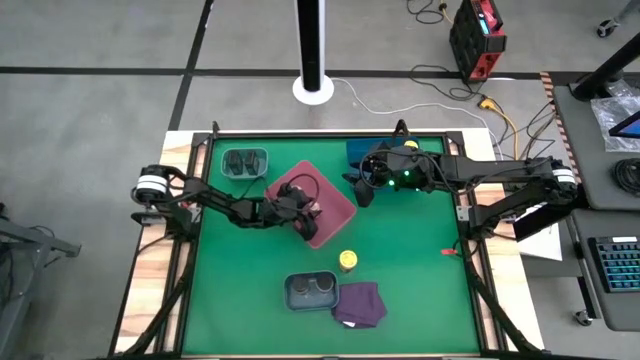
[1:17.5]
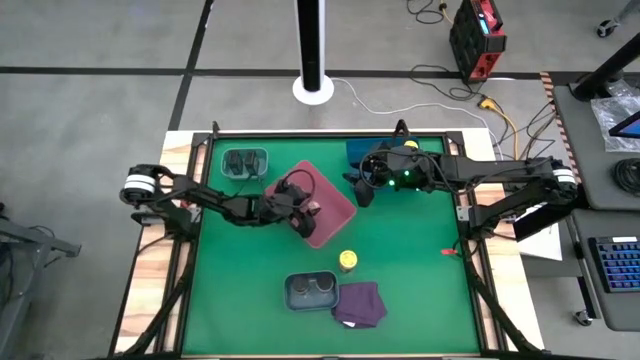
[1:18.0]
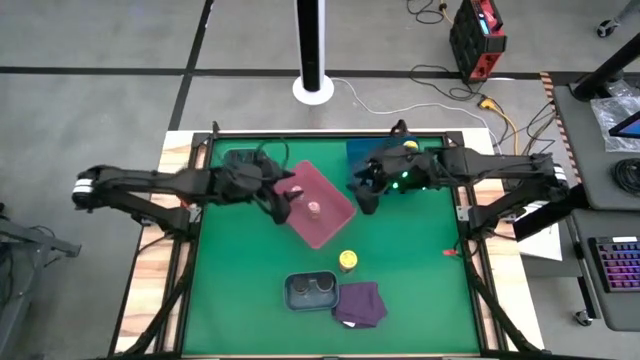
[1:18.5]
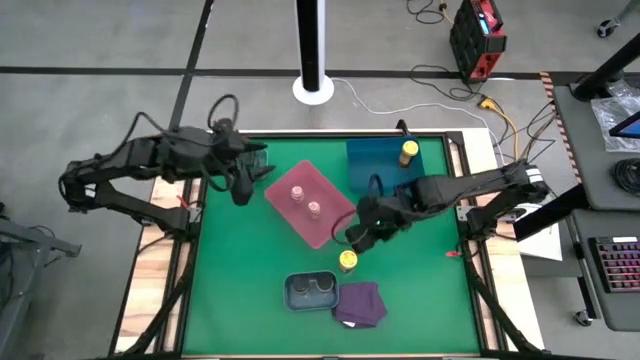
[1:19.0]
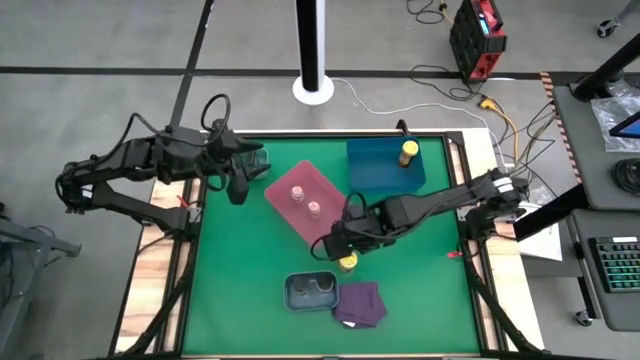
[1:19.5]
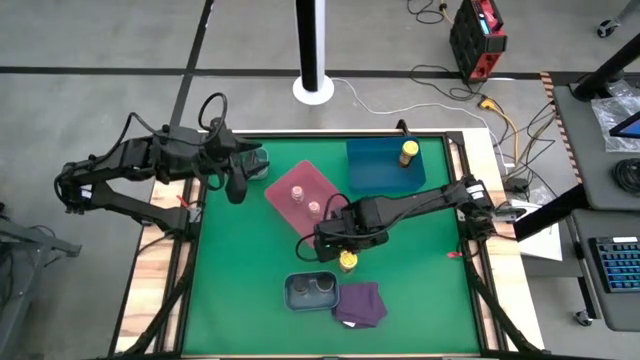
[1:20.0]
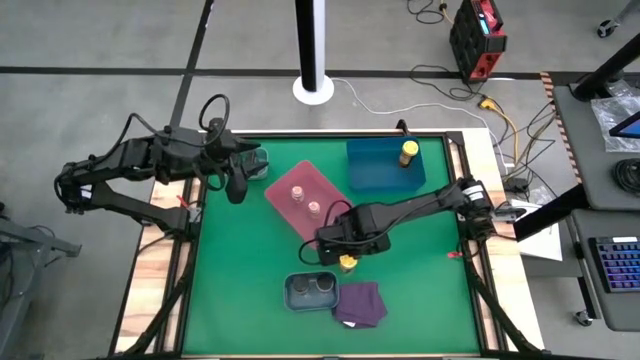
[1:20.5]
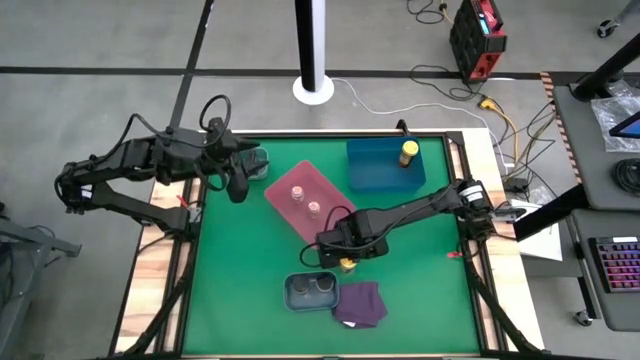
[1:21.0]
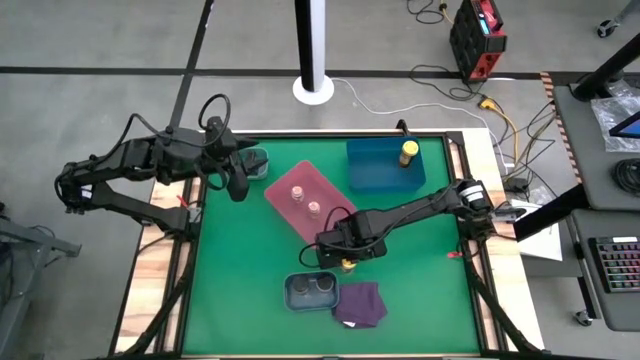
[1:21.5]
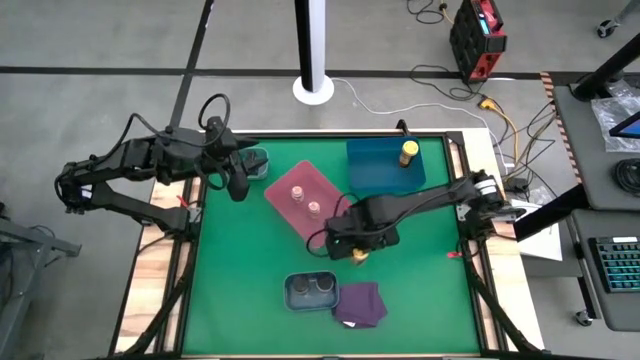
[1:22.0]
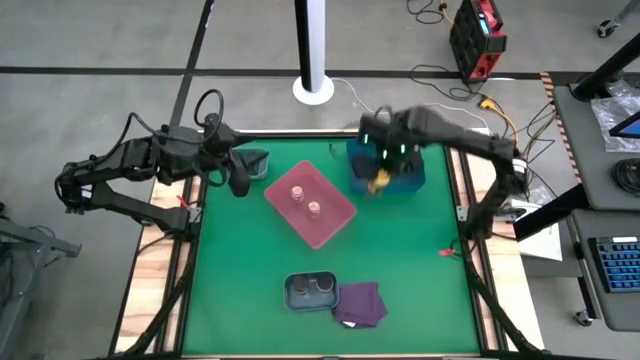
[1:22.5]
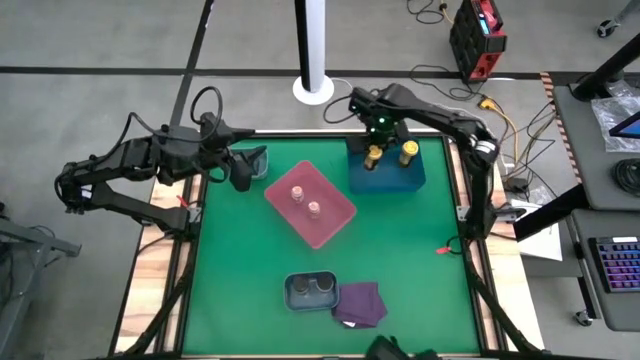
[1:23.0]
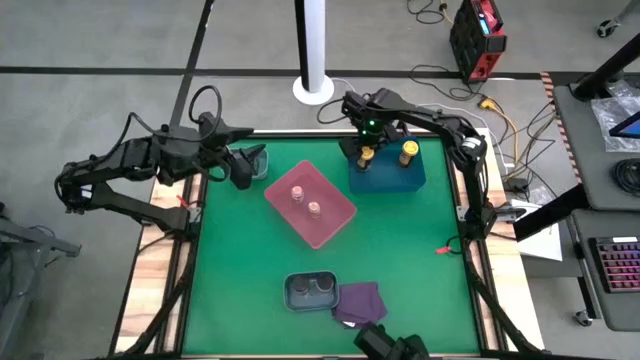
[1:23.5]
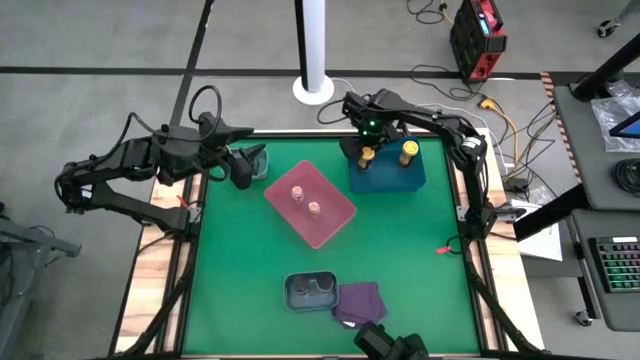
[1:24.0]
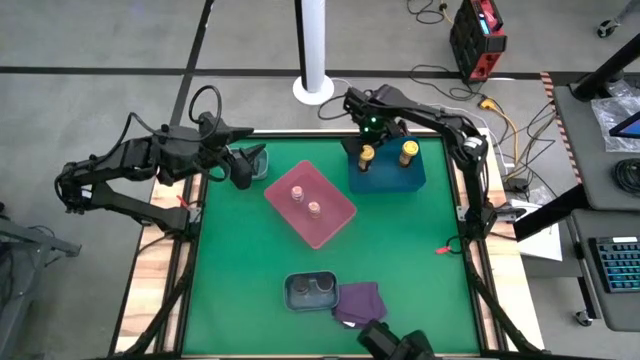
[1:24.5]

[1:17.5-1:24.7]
Task: Sort spices by type
Put the yellow seasoning can into the blue bin

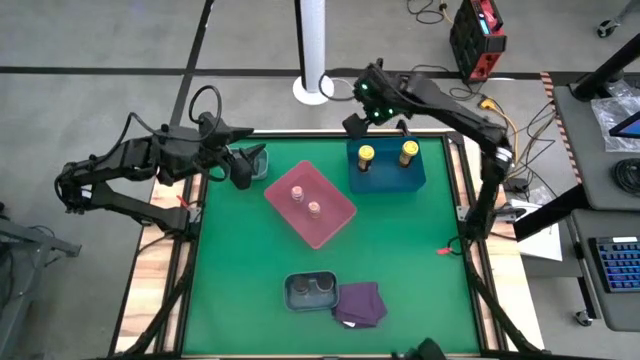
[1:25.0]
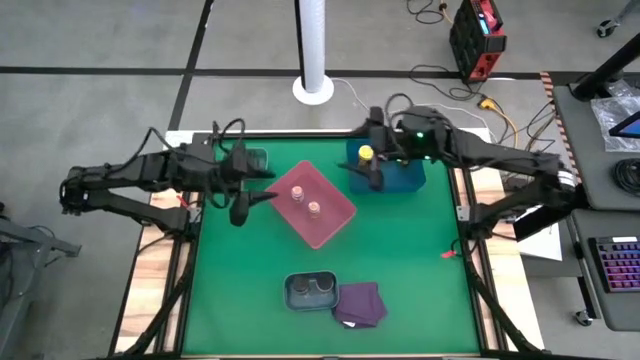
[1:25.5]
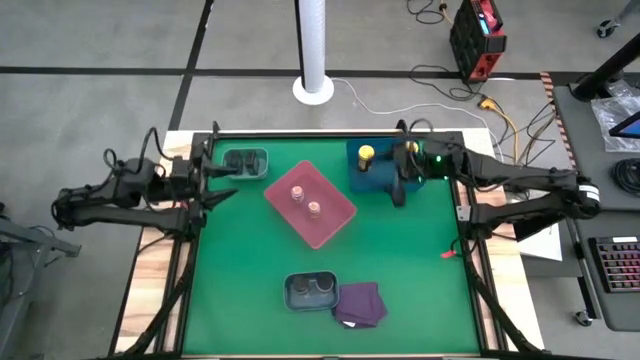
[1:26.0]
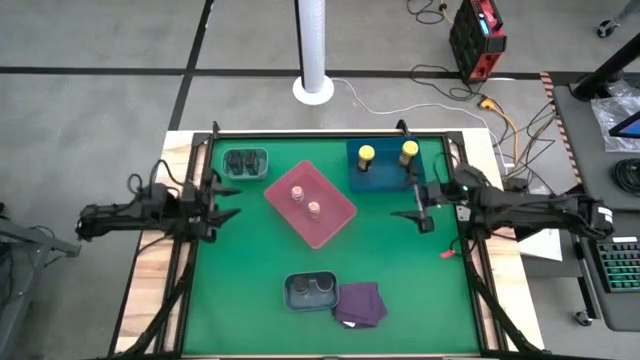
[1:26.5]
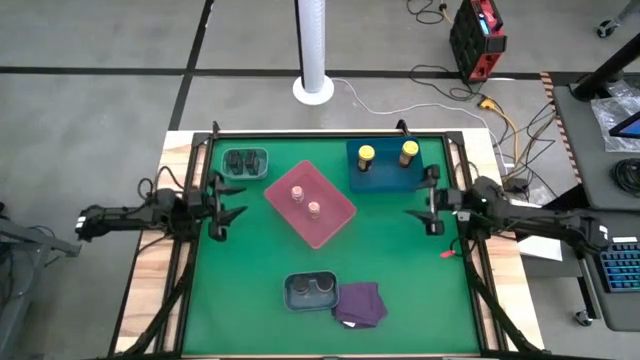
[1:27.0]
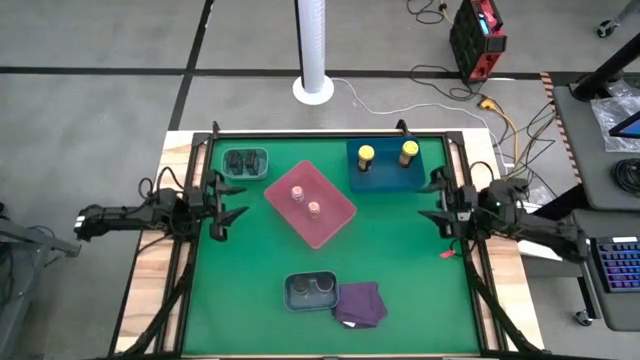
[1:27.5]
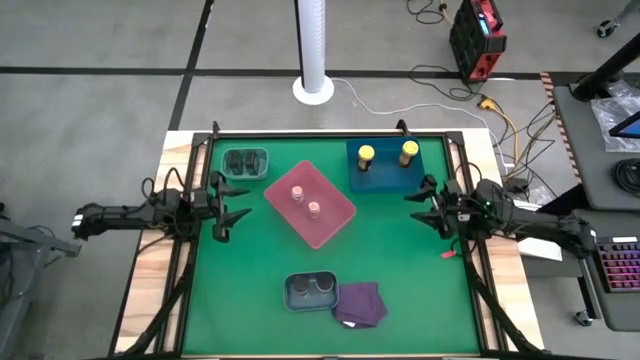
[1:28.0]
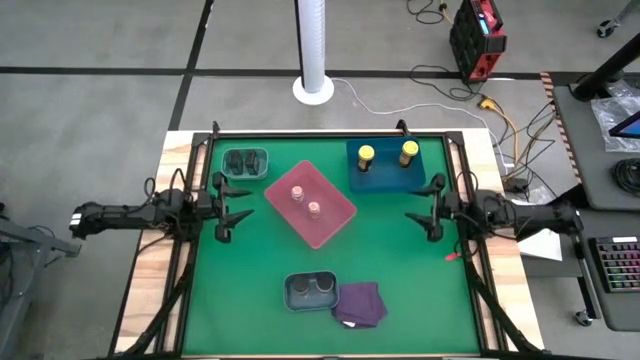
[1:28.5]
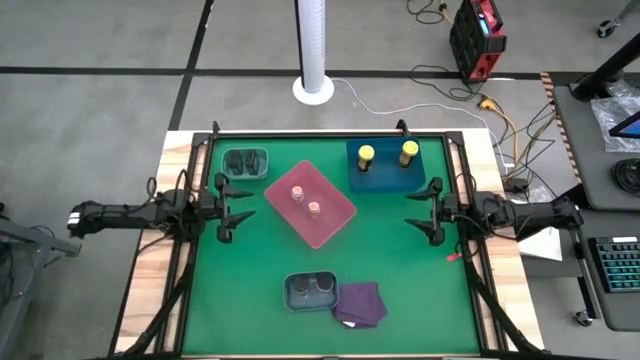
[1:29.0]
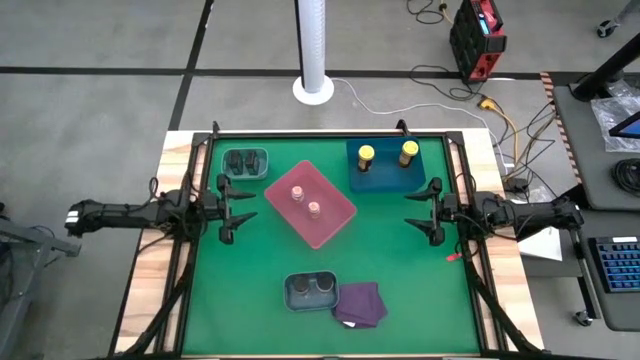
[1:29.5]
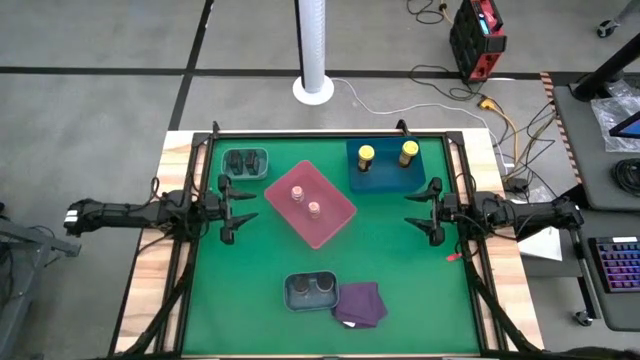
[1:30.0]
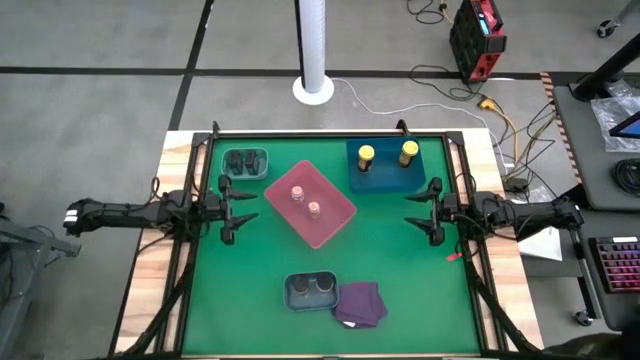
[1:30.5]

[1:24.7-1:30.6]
Return to Home Position

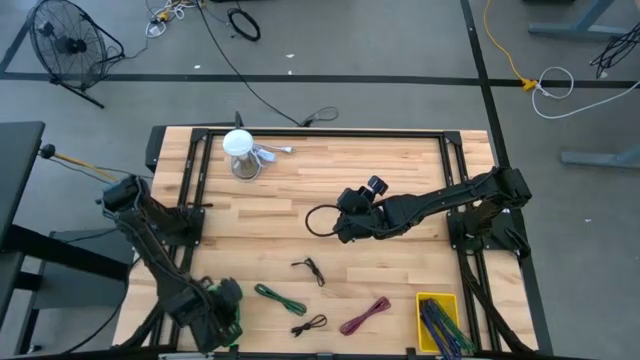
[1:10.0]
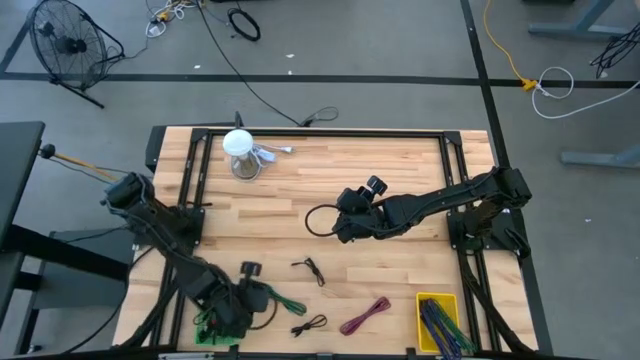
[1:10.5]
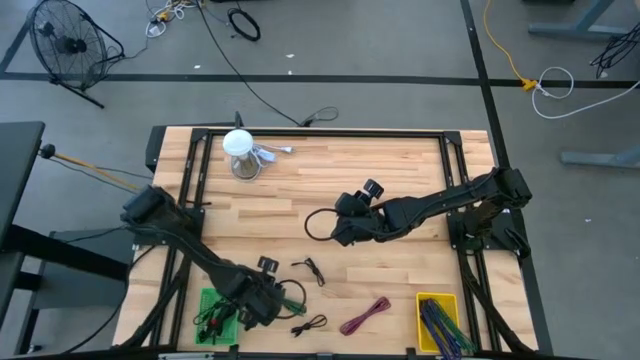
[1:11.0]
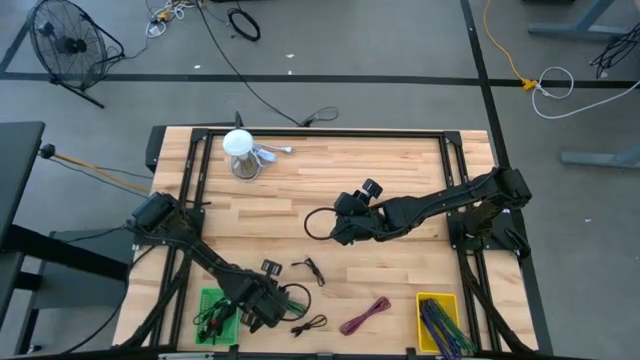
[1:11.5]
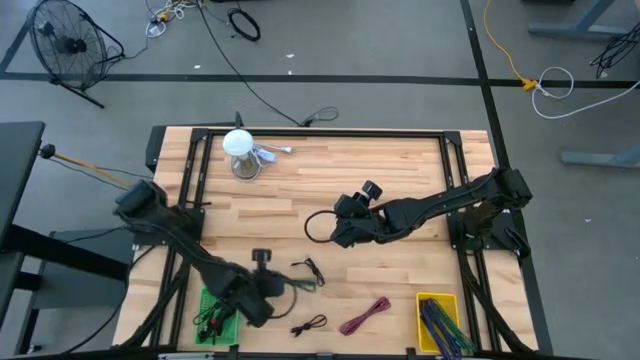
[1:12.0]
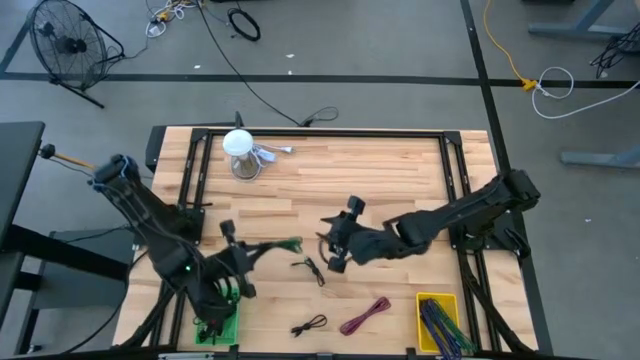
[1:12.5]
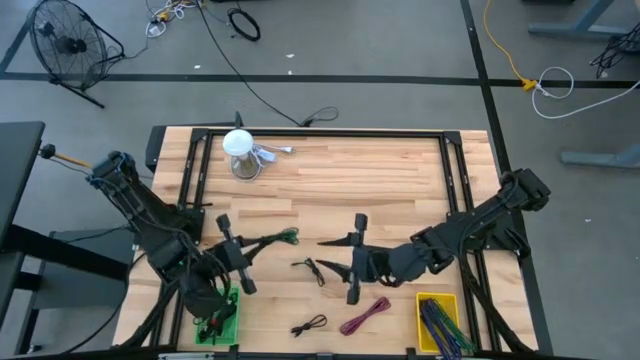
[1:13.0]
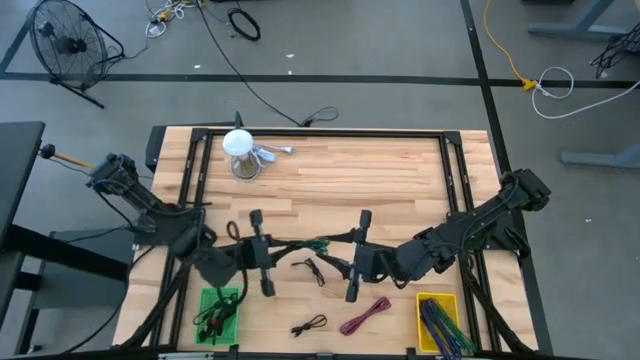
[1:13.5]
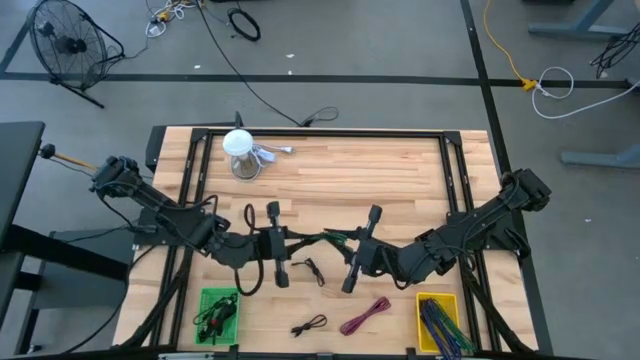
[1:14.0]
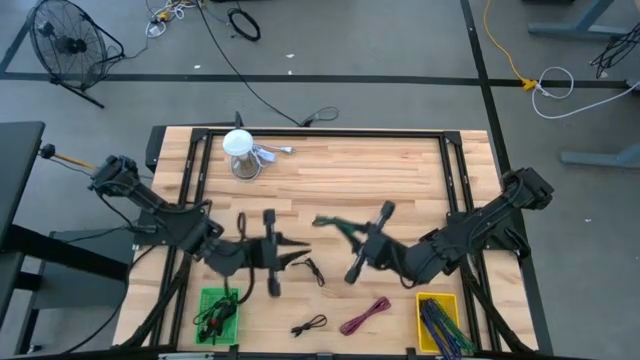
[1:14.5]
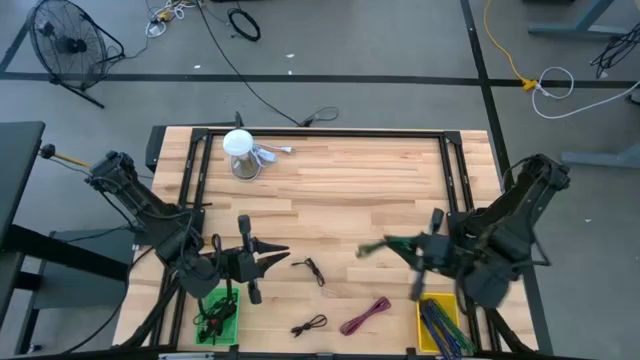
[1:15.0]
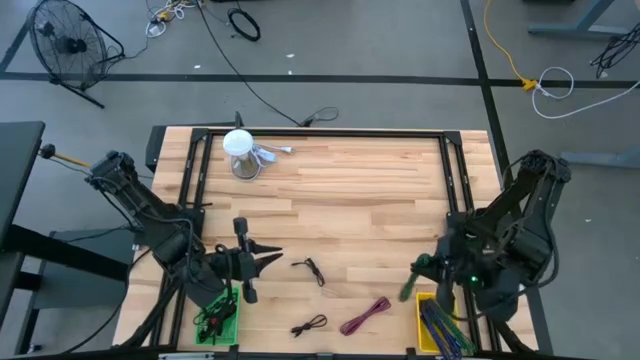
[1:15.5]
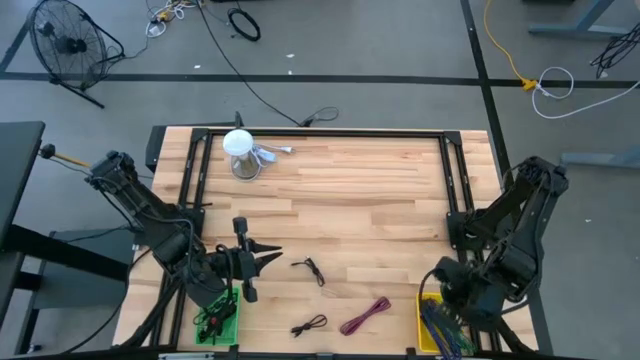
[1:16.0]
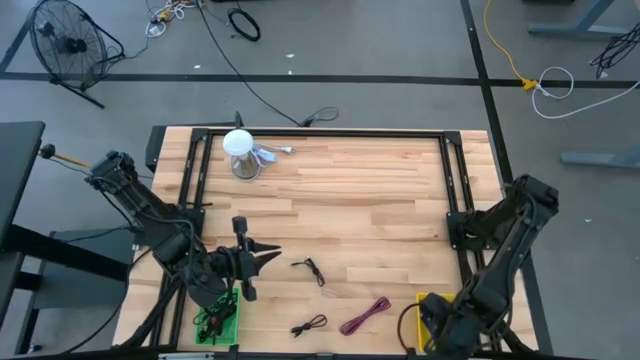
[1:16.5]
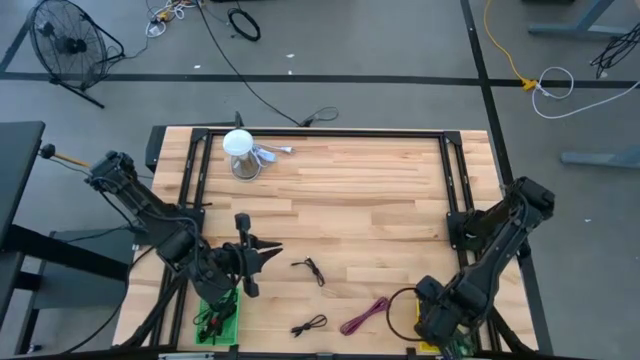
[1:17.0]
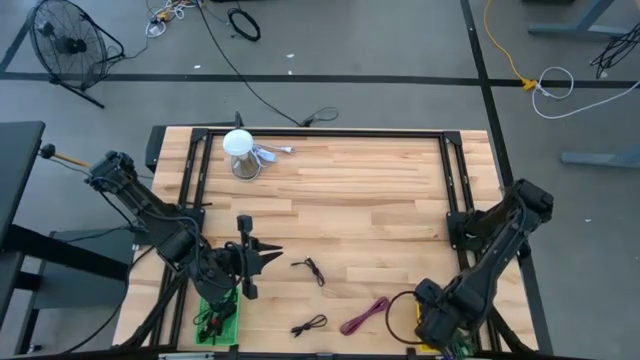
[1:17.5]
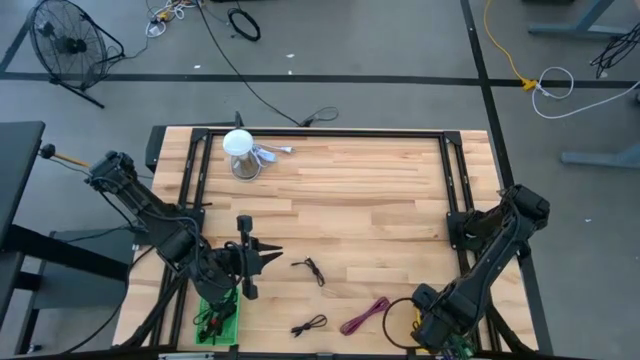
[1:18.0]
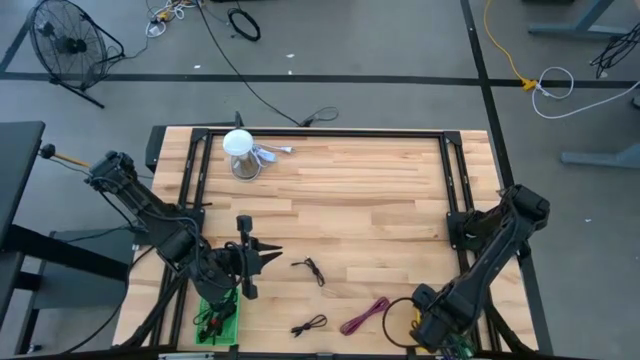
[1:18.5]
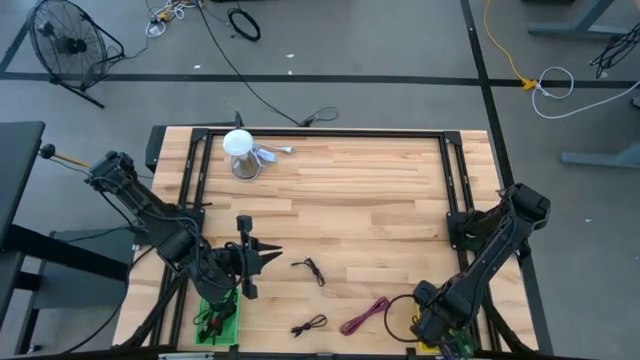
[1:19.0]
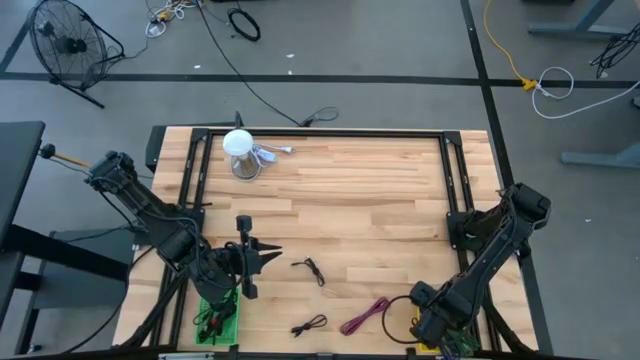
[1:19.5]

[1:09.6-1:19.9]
Task: Pick & Place USB Port
Put the black green charger cable into the yellow bin
